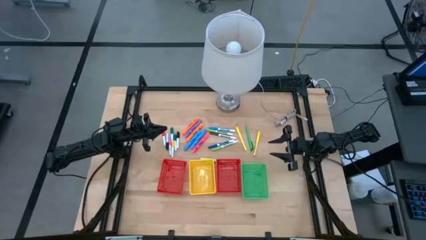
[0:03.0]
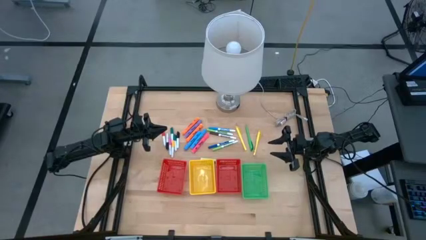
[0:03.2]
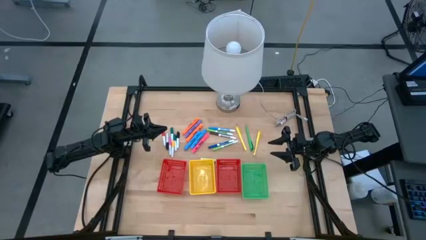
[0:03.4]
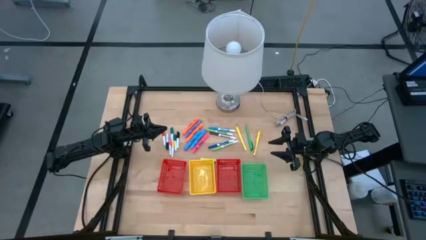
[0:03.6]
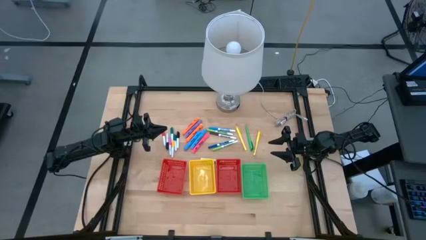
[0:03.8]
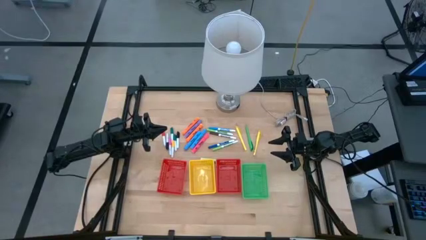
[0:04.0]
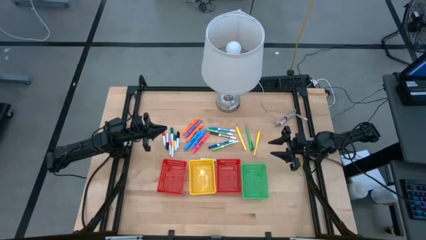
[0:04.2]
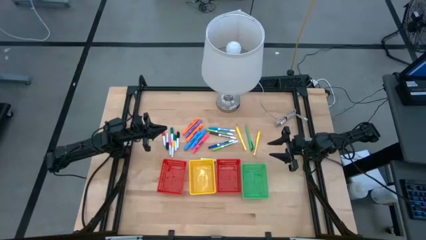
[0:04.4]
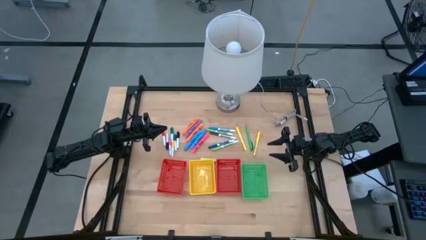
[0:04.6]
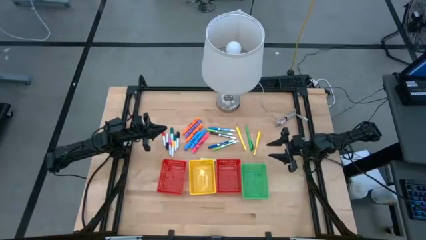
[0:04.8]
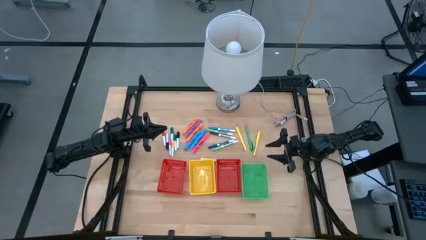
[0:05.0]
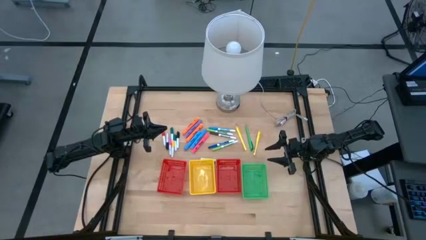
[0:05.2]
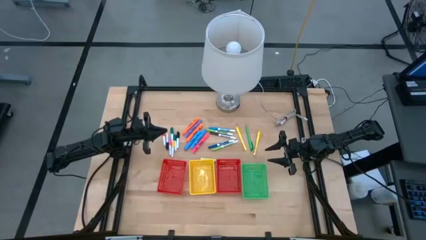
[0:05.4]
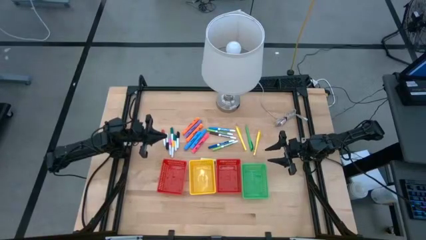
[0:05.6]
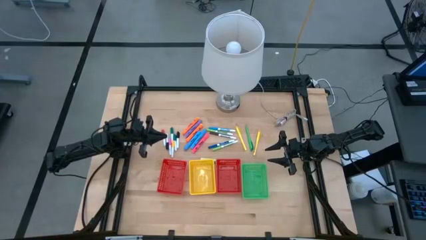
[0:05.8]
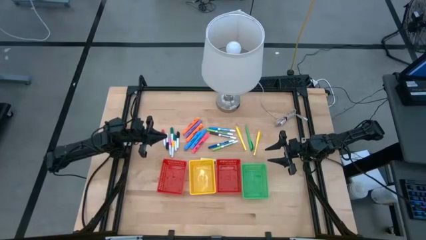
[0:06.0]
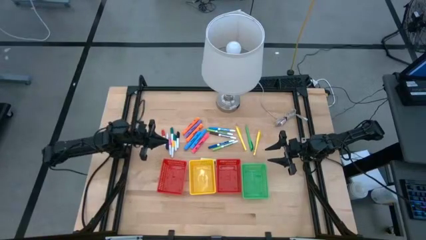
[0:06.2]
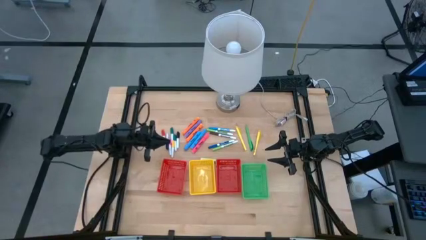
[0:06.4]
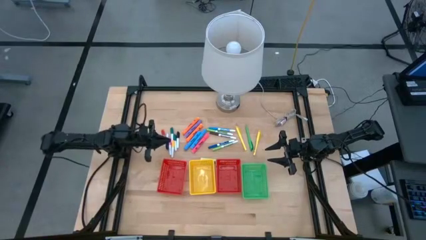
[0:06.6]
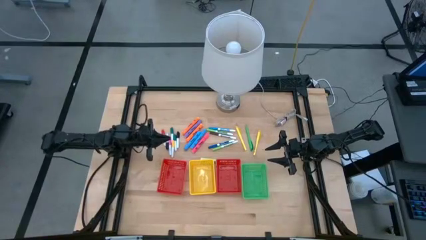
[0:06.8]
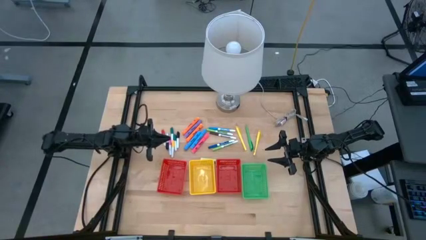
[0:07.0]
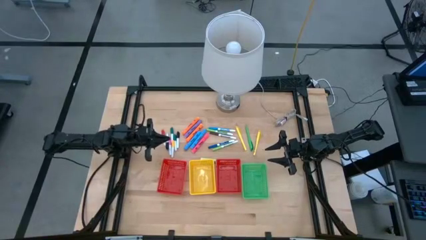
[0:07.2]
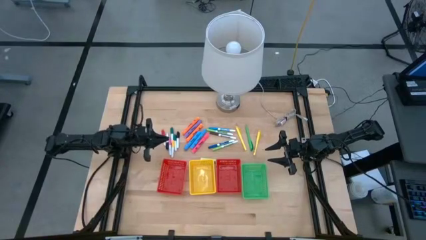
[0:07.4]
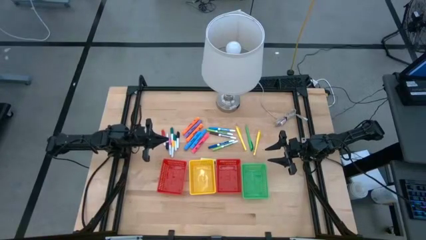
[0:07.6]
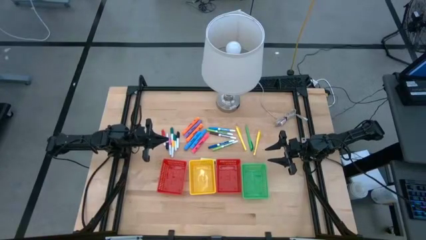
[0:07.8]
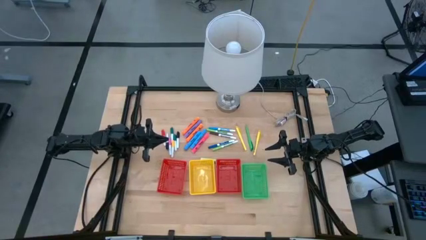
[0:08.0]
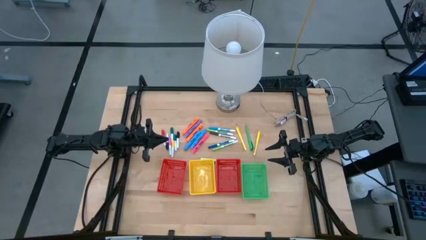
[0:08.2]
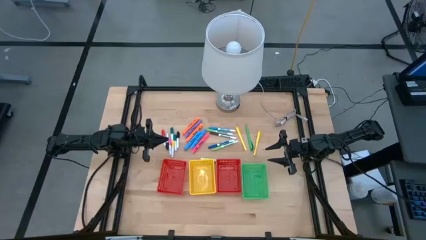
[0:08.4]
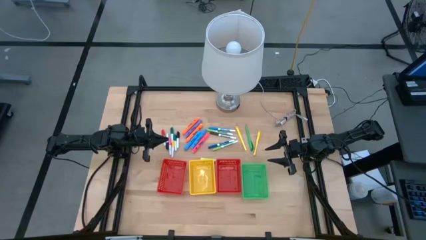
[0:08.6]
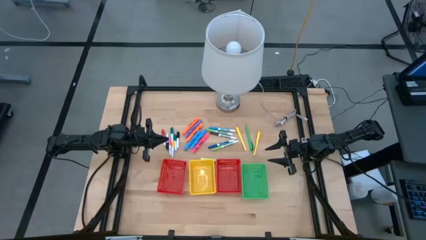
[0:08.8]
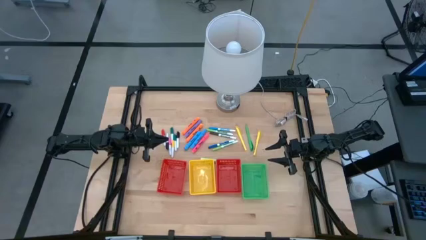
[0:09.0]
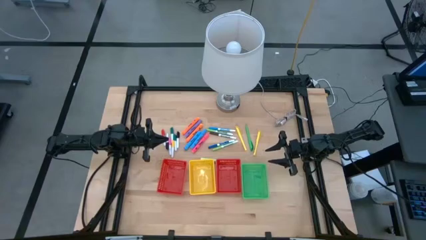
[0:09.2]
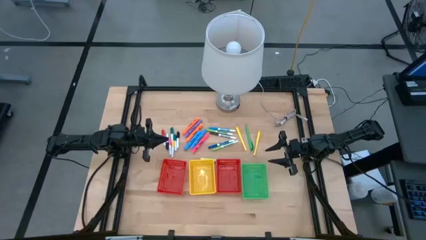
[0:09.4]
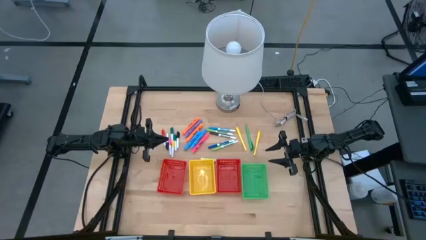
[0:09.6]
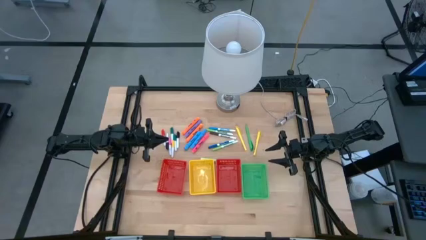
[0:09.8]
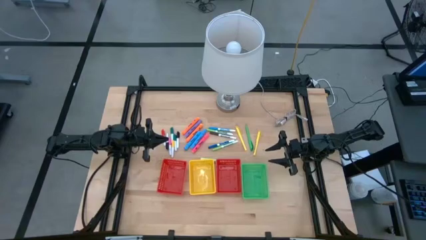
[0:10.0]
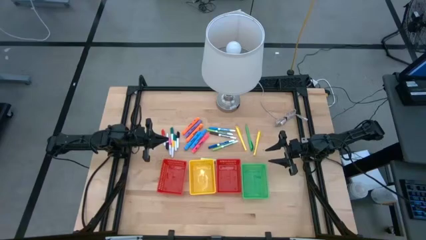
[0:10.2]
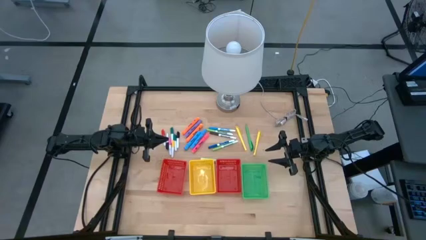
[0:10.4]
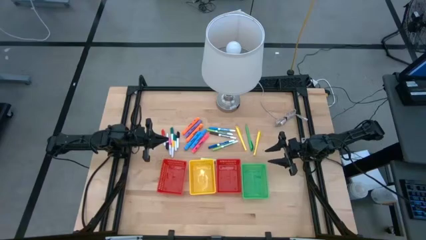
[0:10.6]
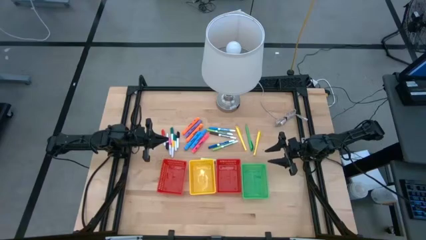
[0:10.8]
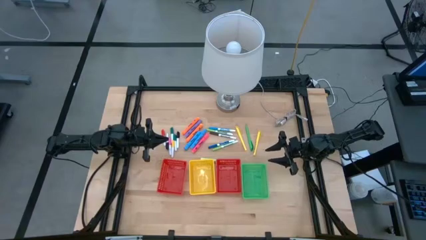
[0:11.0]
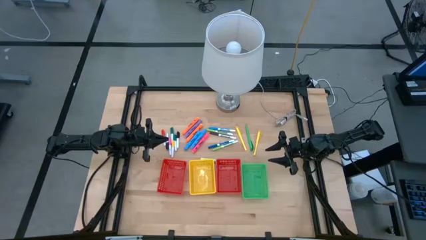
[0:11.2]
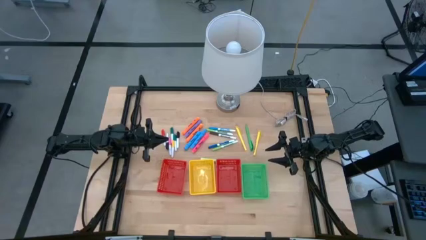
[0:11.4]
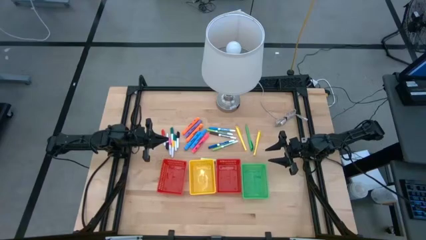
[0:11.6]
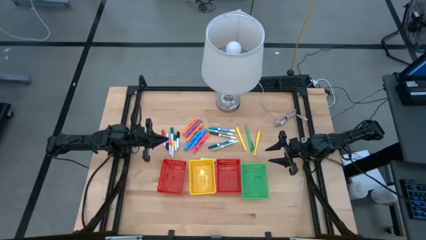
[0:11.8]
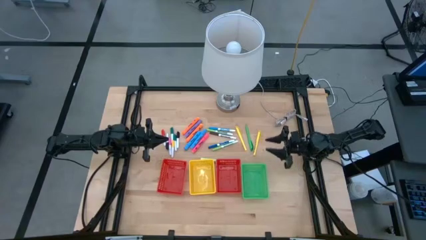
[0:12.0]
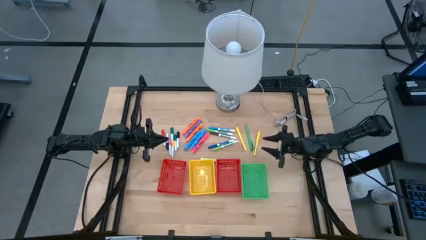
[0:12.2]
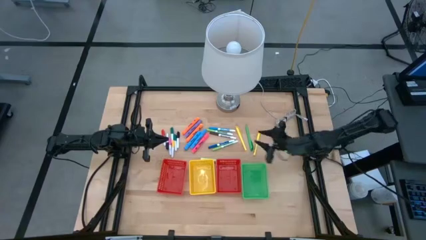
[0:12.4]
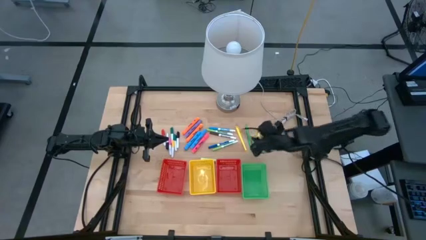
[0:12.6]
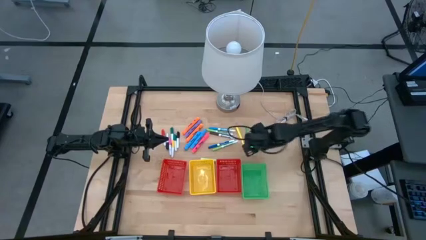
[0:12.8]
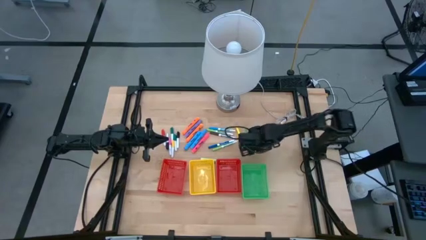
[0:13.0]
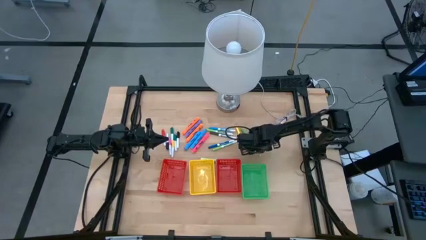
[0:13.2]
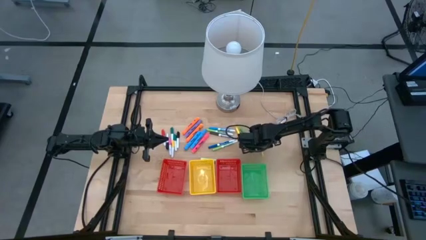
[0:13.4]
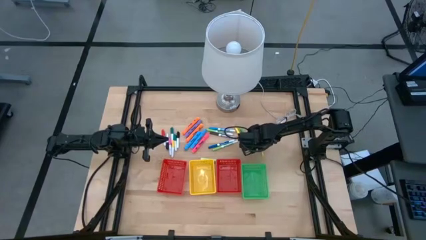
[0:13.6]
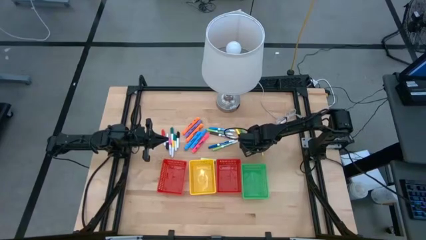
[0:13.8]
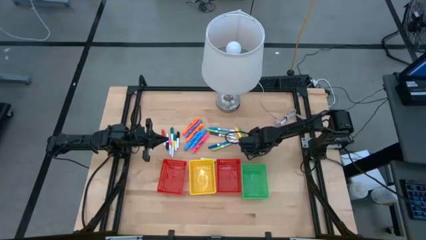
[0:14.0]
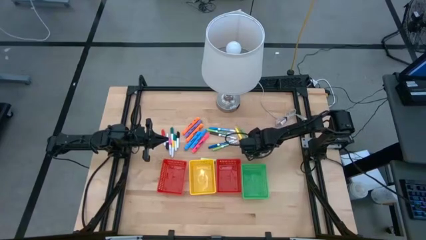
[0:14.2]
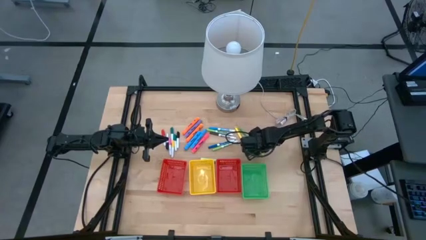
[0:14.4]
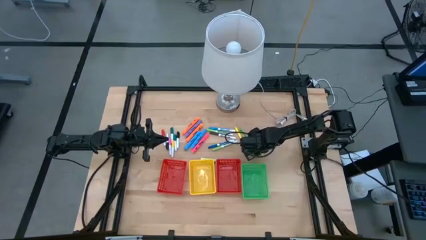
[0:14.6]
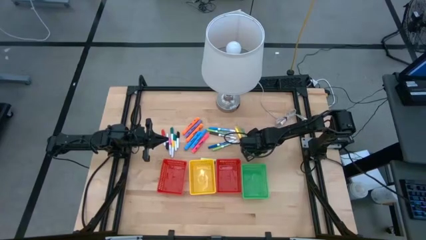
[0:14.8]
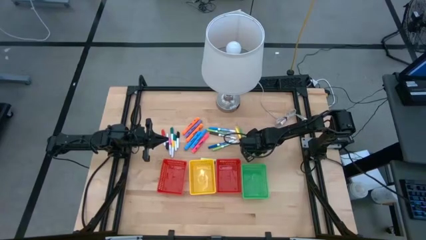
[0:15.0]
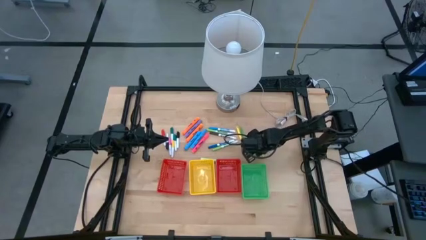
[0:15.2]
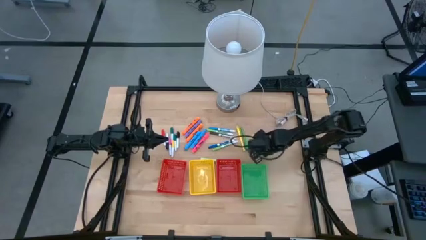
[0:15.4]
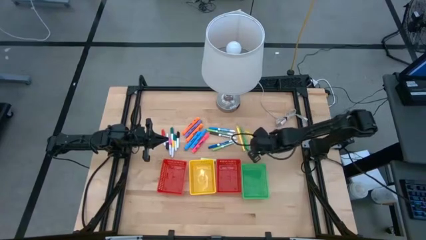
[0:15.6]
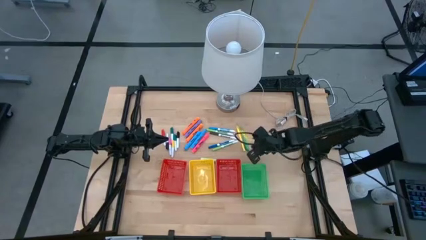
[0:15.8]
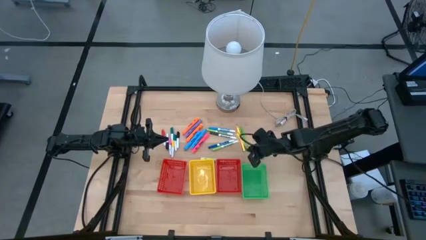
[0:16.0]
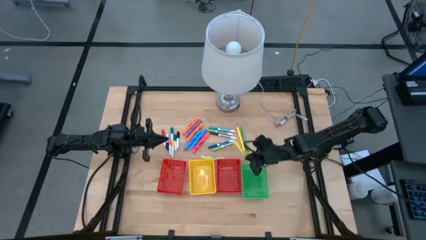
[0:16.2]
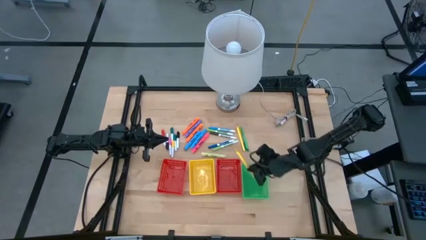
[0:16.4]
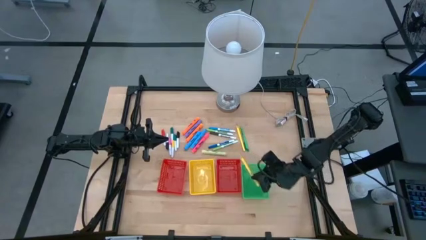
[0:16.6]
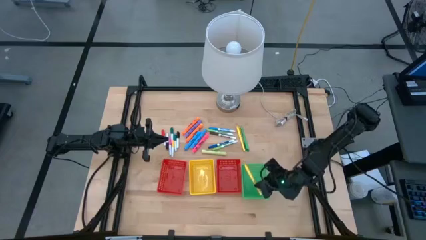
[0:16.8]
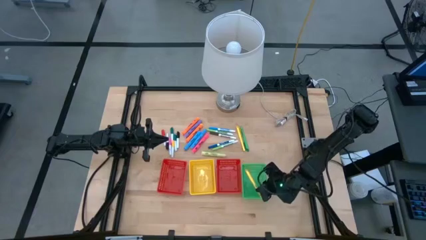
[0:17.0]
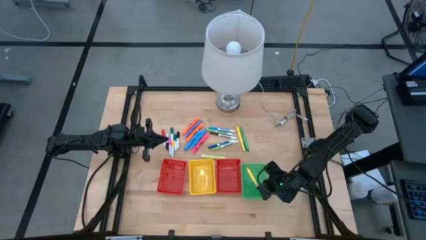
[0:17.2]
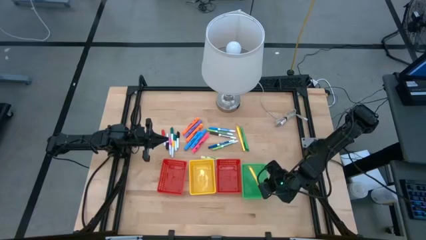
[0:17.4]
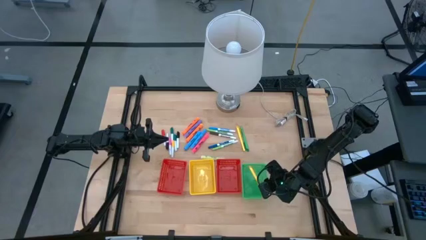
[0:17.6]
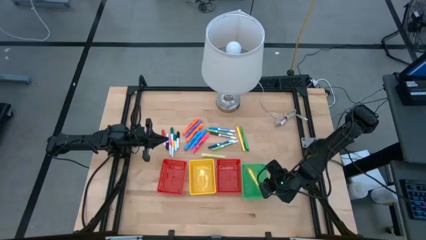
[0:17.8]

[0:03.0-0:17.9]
Task: Pick & Place Markers
Put the yellow pen into the green bin
